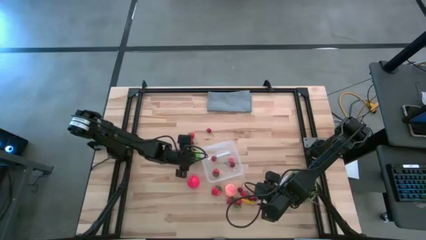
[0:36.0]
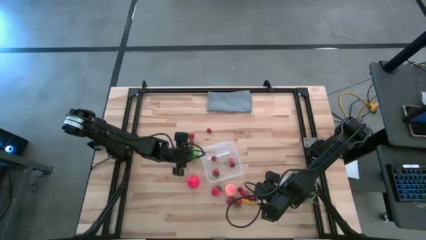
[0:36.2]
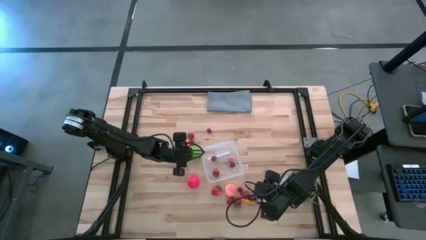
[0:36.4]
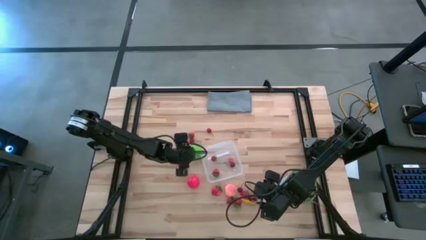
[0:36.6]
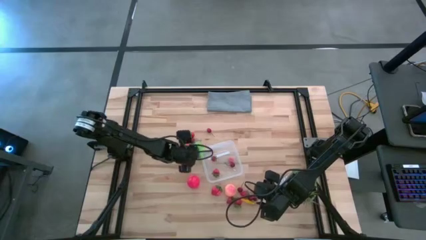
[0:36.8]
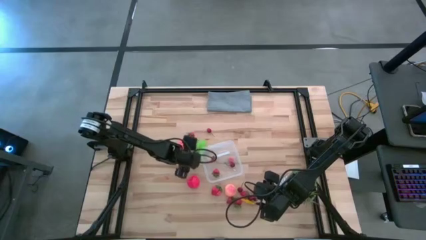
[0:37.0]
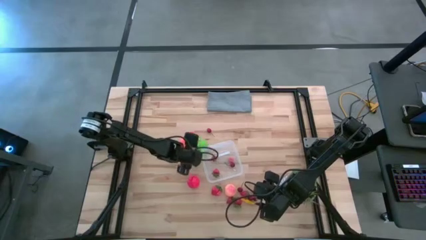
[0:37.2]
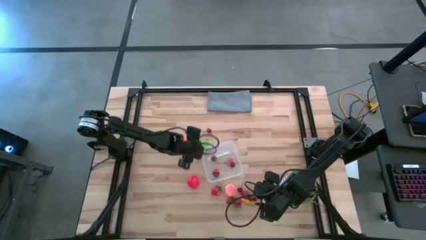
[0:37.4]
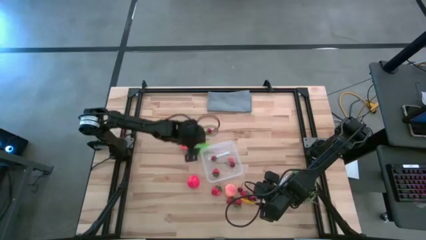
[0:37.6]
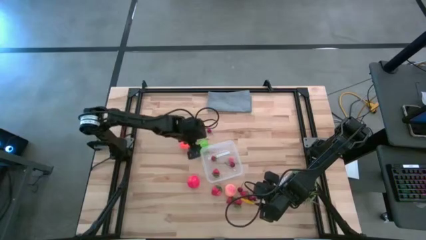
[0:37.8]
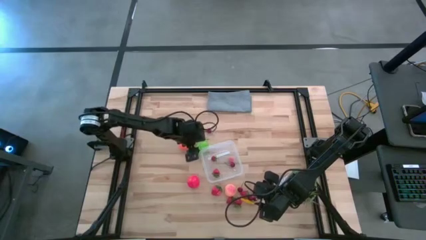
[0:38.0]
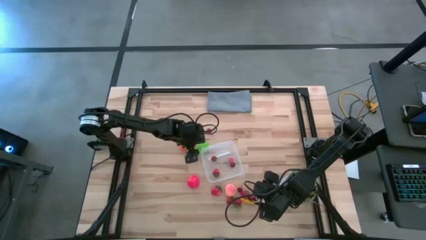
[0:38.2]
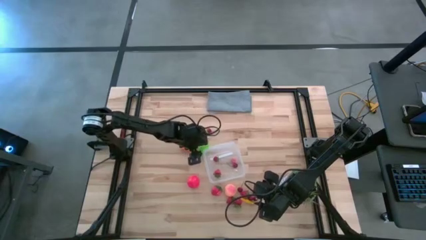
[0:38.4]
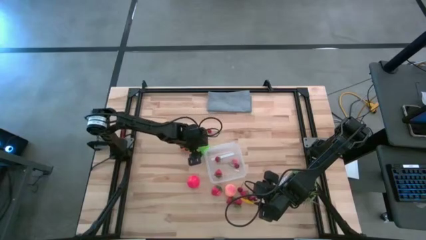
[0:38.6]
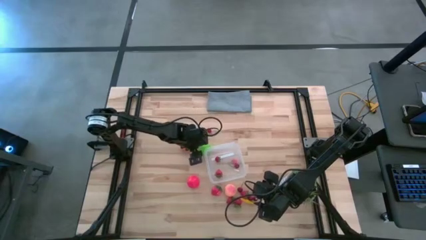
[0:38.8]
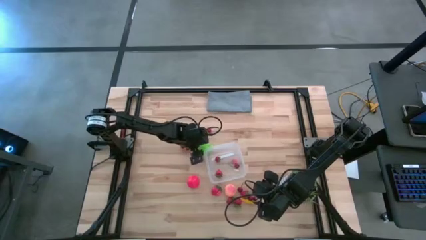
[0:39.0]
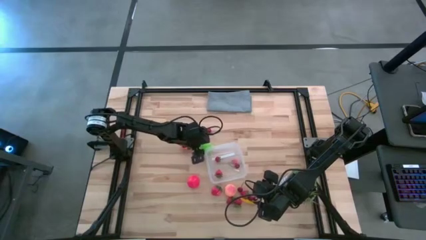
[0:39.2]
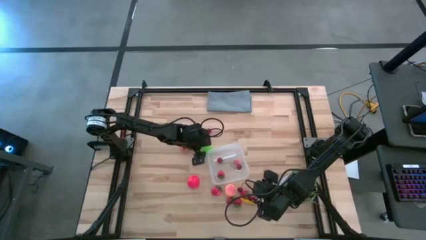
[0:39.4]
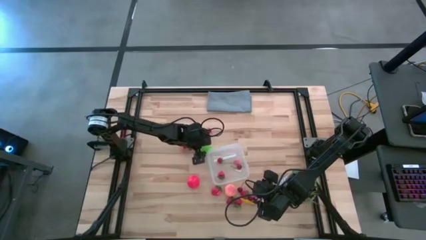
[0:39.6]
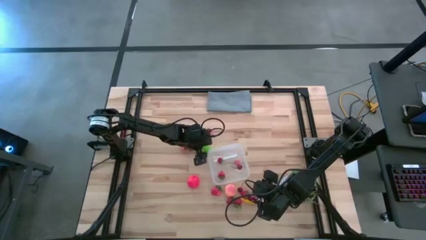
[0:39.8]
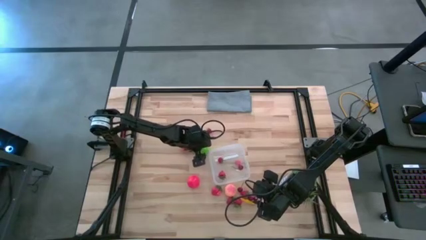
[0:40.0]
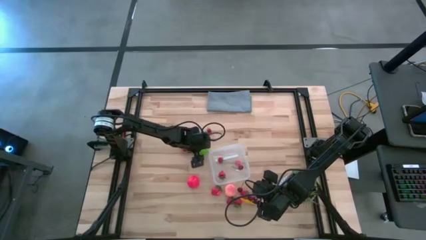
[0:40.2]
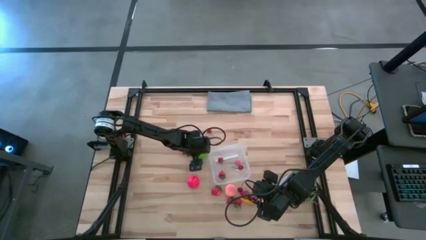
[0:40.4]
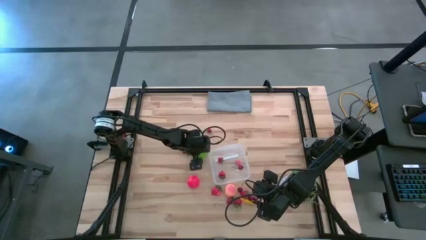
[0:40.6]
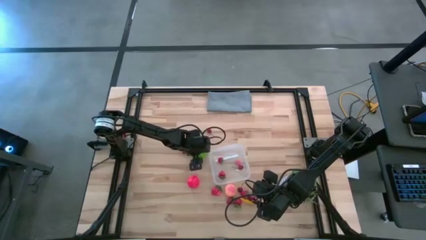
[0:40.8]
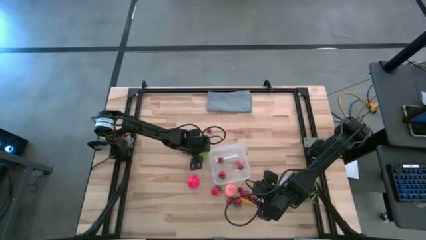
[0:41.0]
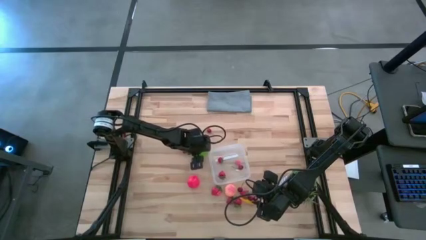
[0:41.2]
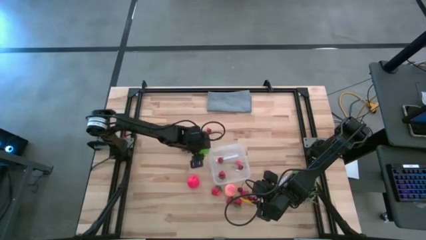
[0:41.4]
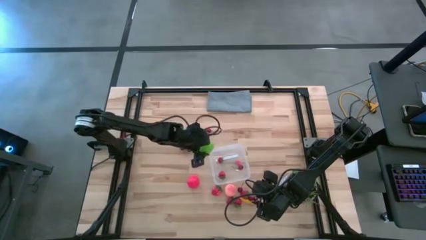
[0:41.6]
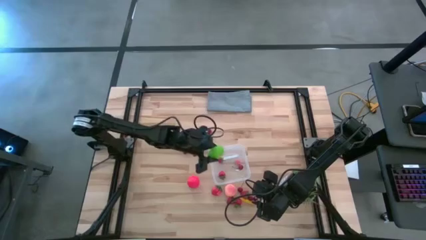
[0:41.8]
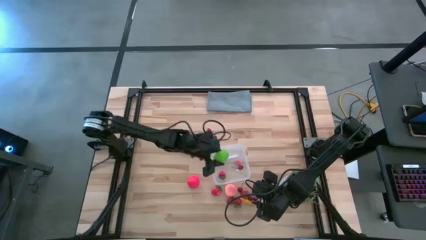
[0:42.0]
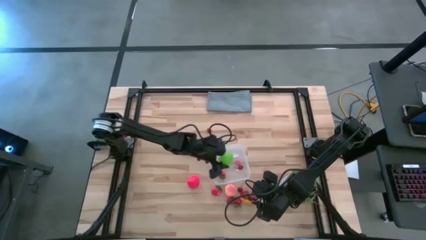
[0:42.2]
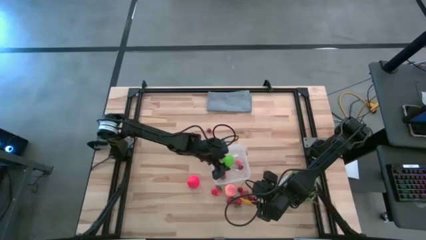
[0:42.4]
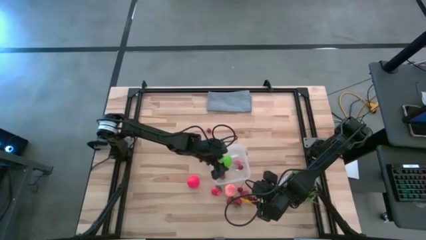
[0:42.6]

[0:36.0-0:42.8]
Task: Pick and placing Produce into tupperware
Put the green melon into the transparent container

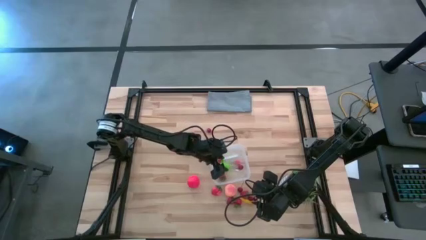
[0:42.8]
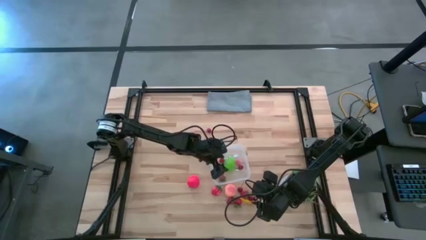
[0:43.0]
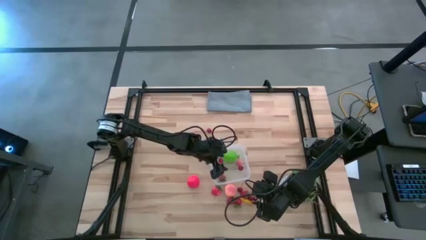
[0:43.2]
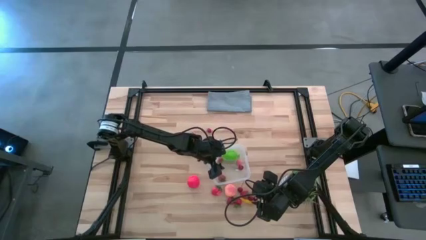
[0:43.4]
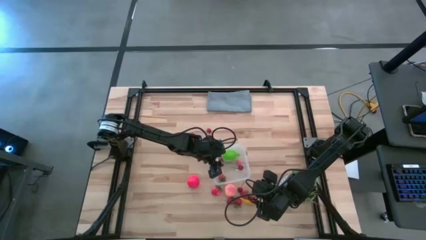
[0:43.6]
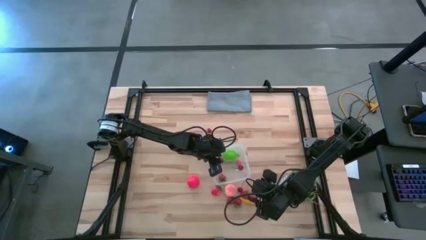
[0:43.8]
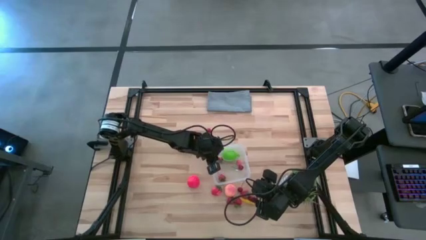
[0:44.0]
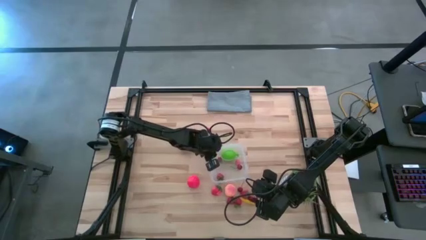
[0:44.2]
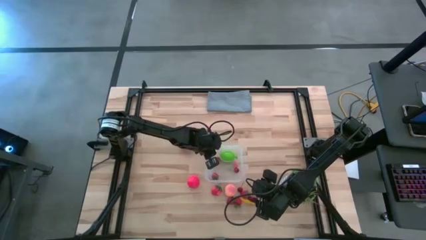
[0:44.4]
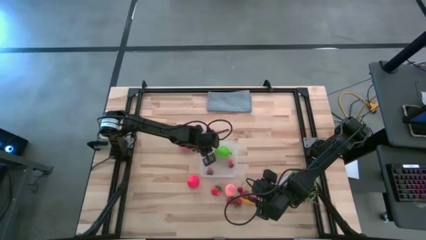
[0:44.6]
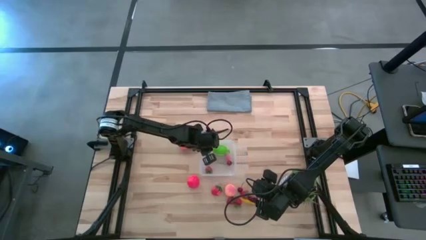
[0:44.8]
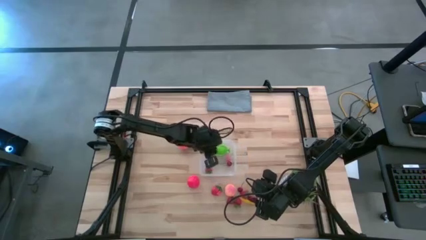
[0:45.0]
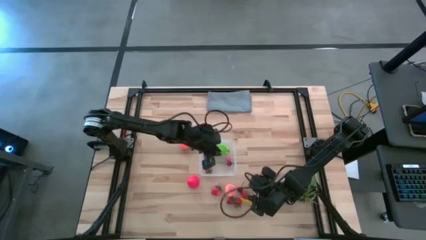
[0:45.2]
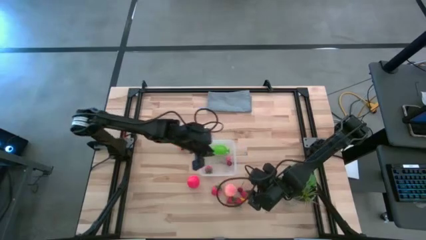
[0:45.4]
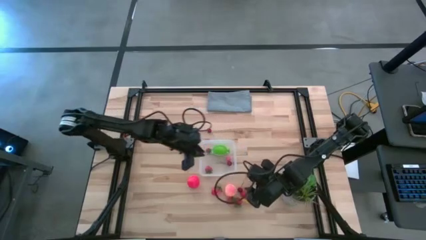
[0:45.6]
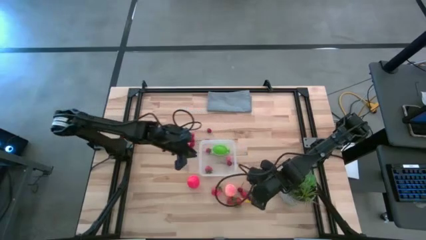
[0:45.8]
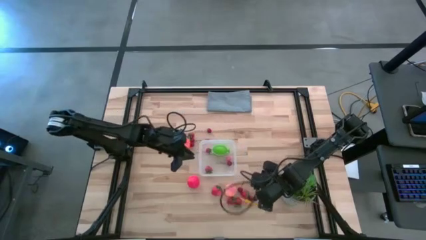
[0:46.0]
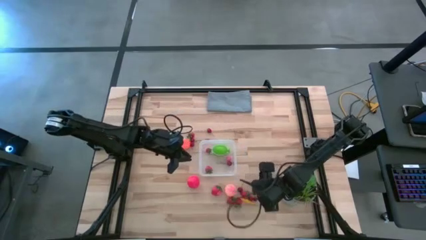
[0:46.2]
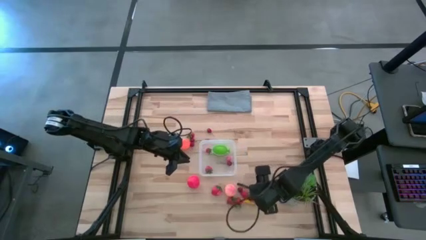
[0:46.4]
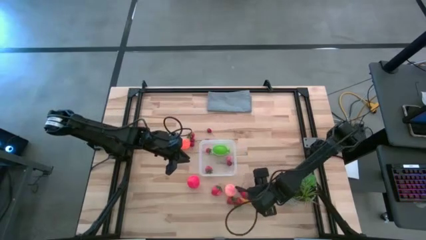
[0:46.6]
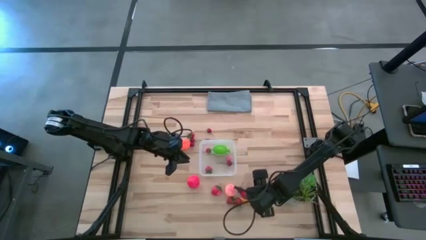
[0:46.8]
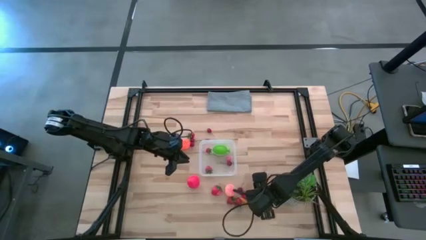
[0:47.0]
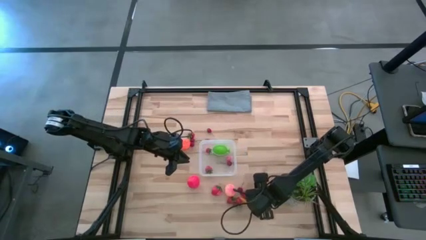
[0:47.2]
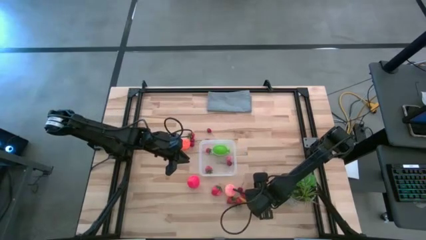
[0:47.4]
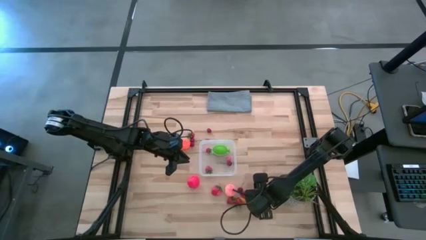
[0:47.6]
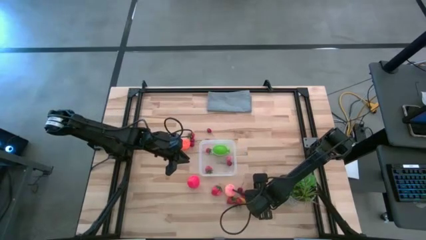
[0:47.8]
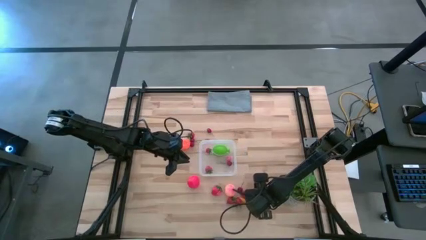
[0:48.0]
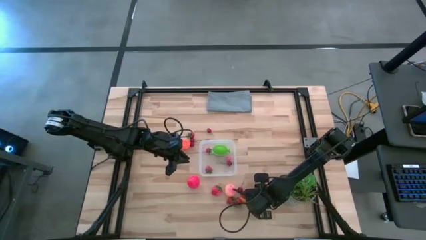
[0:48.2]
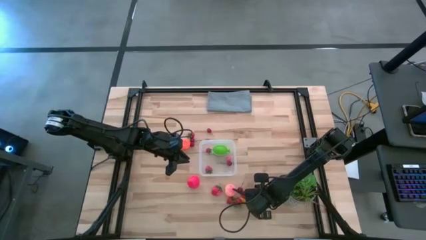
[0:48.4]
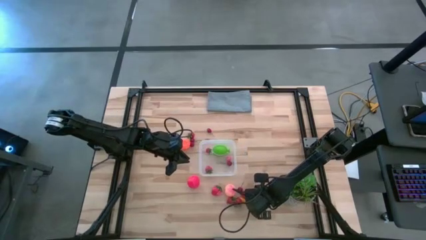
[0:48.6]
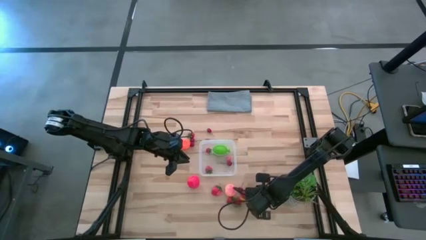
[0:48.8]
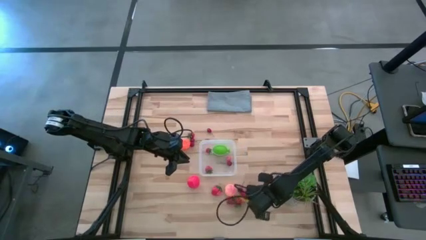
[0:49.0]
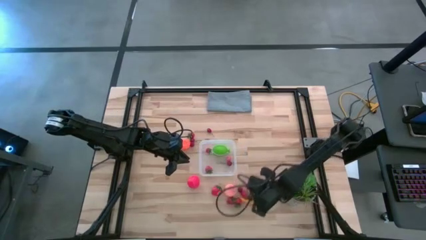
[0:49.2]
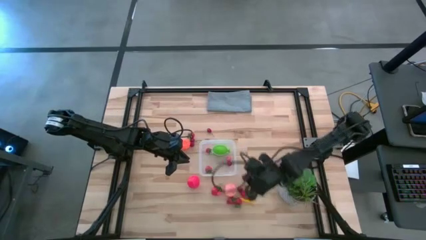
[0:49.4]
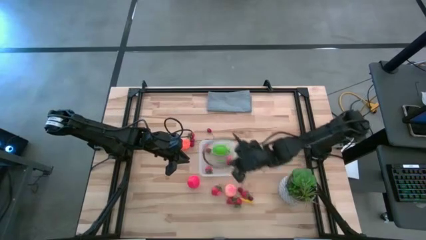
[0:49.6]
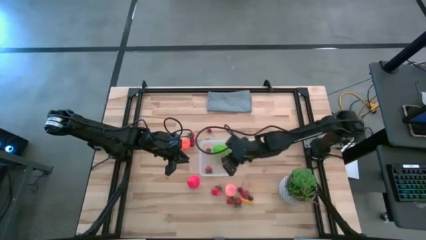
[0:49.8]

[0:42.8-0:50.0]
Put the red cherry into the transparent container

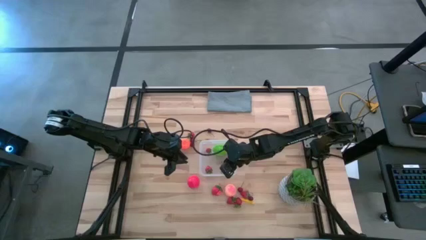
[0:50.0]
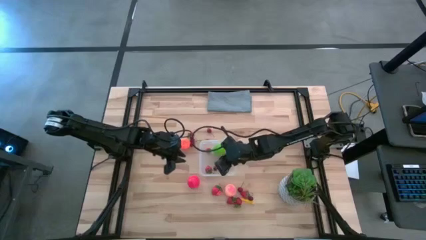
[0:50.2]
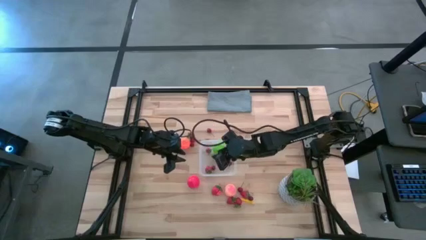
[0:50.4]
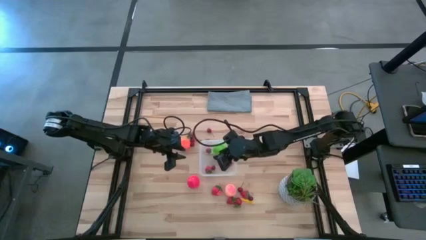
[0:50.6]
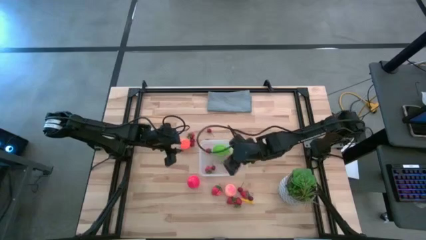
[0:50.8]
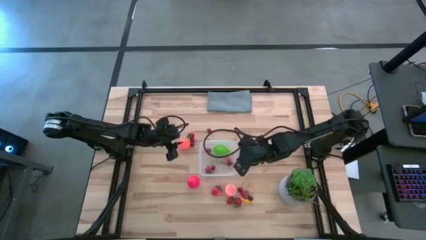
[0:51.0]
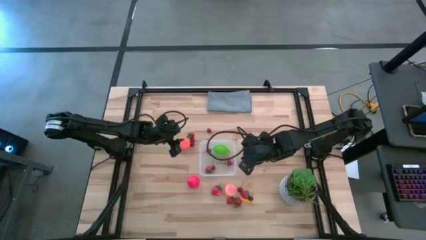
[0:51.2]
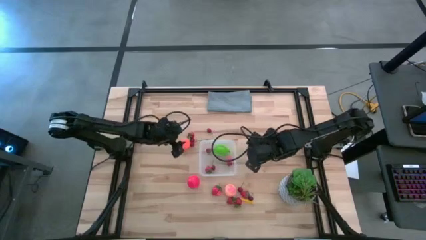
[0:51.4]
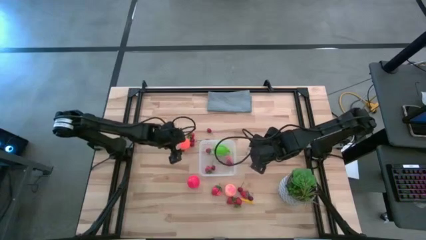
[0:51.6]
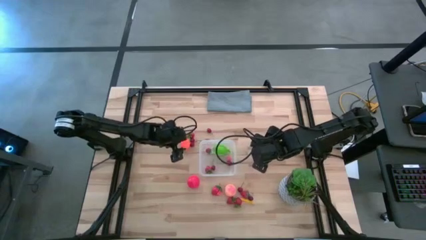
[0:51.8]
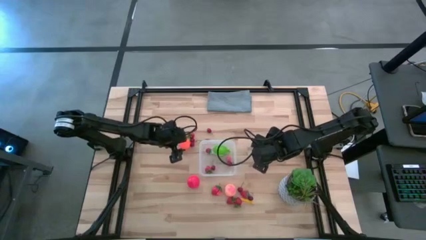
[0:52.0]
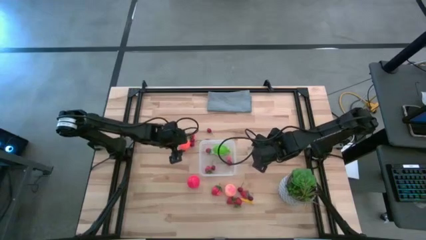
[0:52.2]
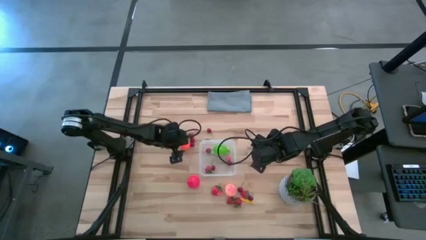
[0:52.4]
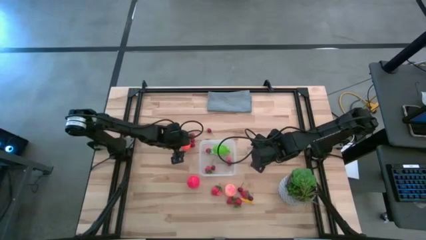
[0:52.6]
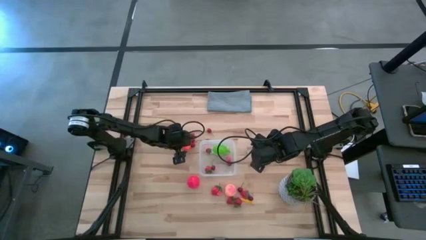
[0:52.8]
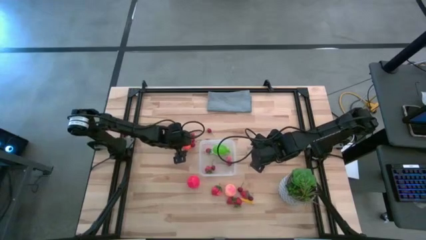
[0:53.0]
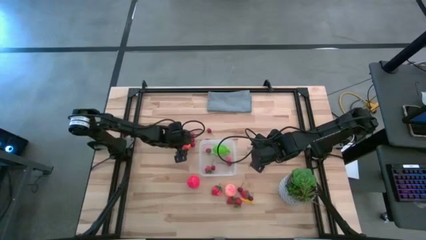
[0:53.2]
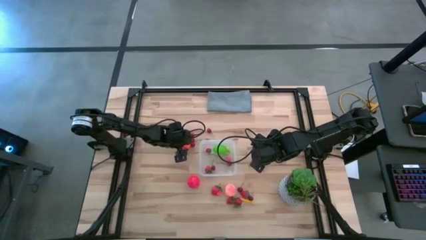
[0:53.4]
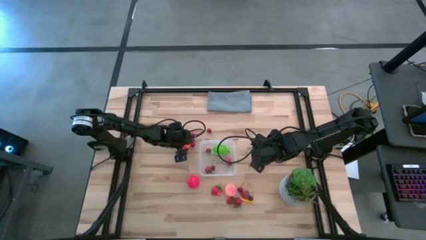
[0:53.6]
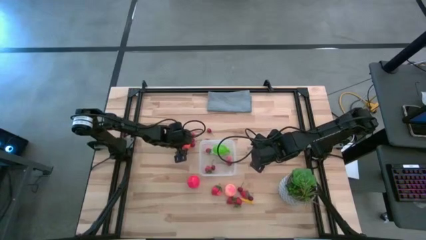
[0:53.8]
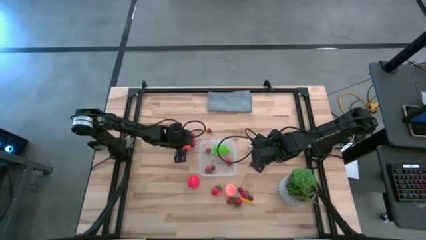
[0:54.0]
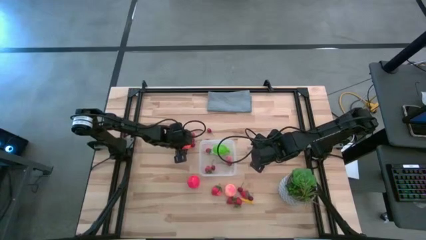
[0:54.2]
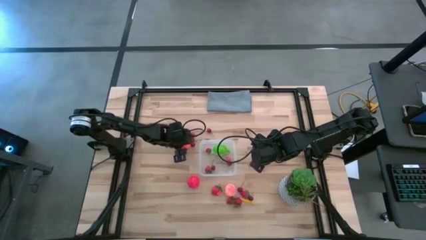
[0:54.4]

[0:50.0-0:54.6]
Put the orange pumpkin into the transparent container
